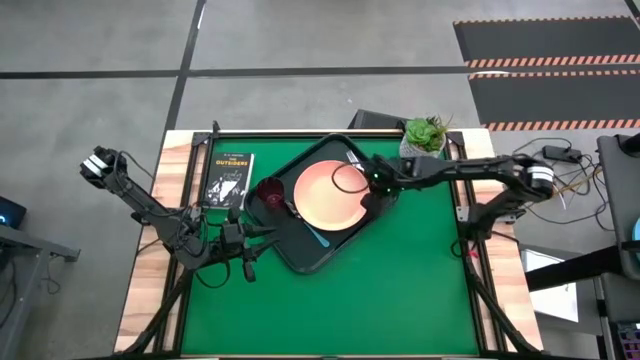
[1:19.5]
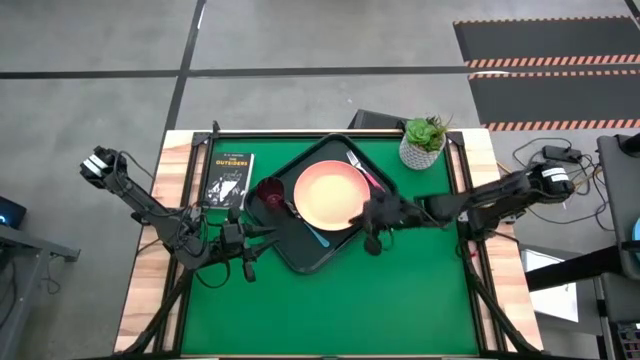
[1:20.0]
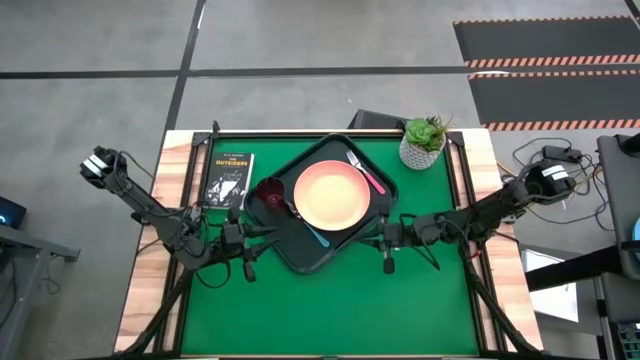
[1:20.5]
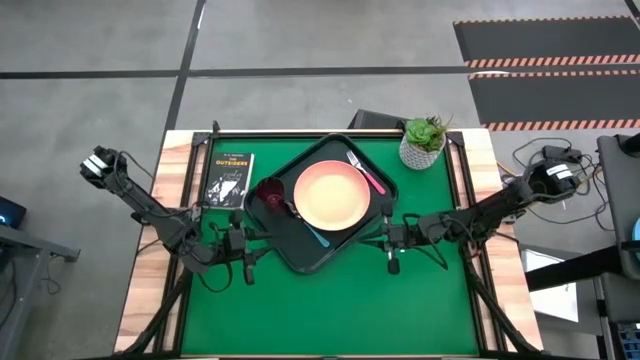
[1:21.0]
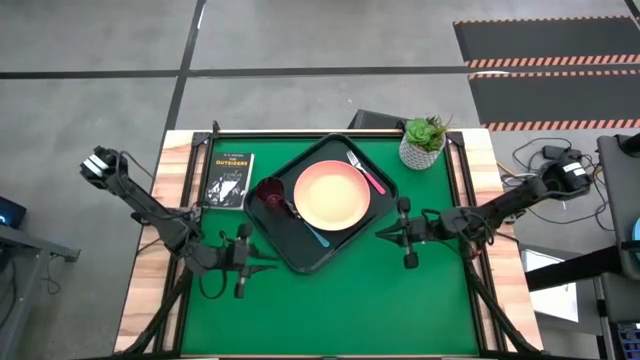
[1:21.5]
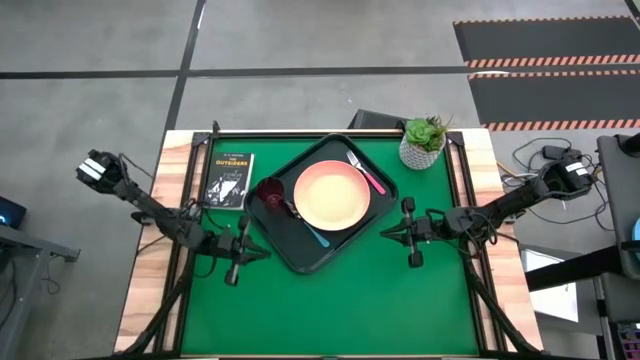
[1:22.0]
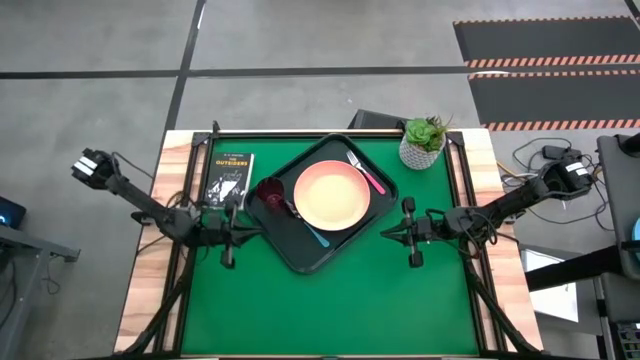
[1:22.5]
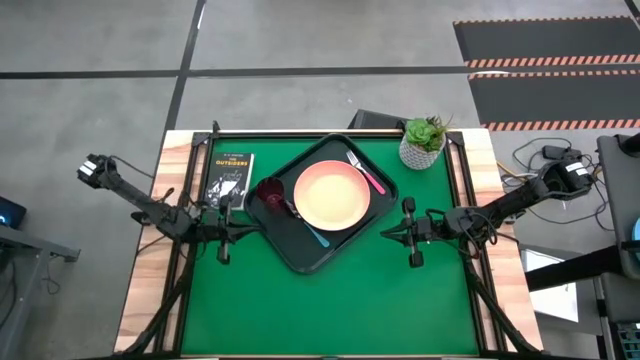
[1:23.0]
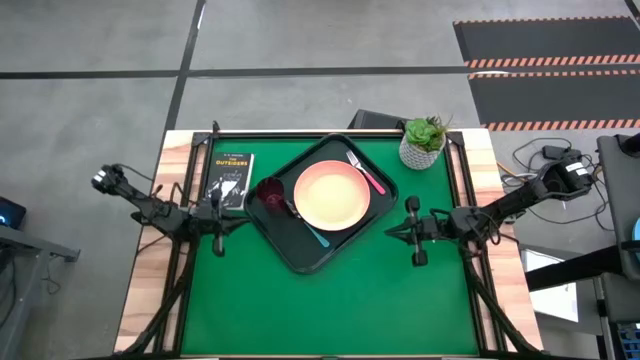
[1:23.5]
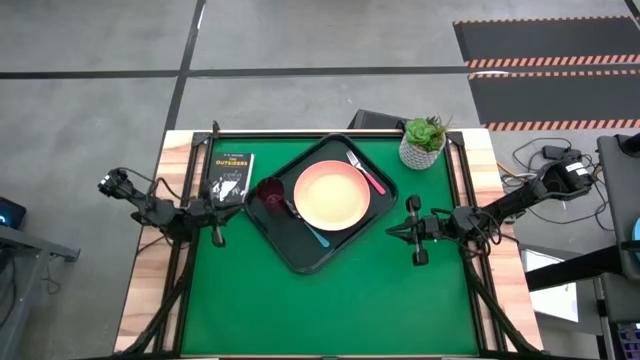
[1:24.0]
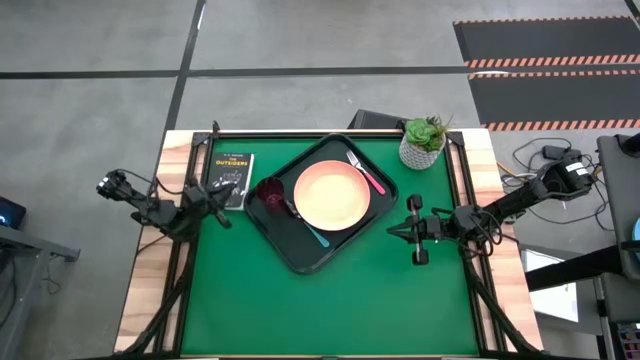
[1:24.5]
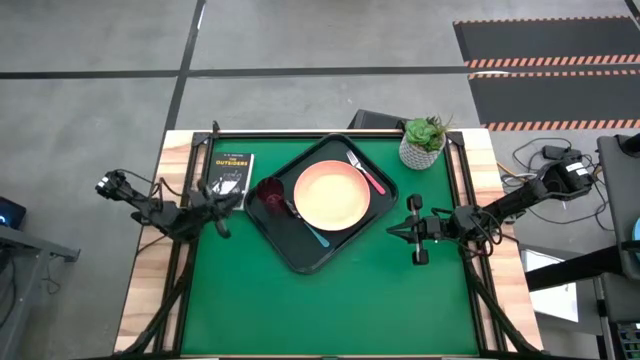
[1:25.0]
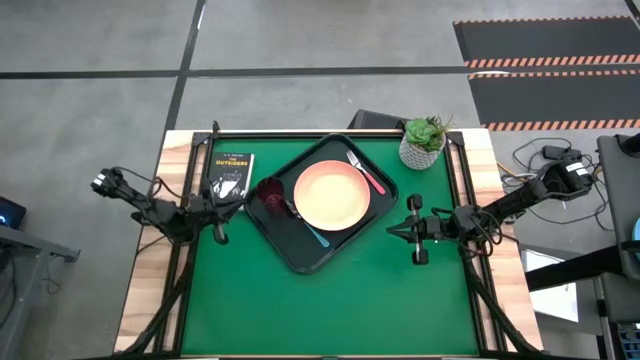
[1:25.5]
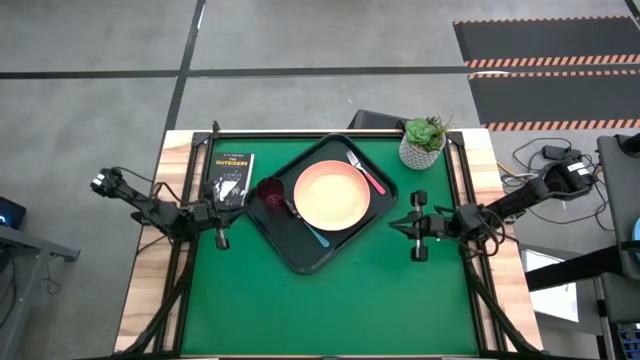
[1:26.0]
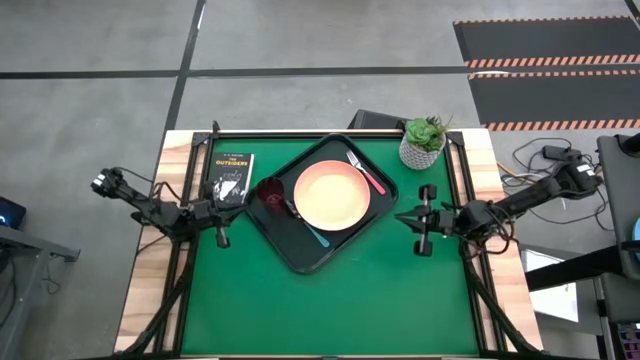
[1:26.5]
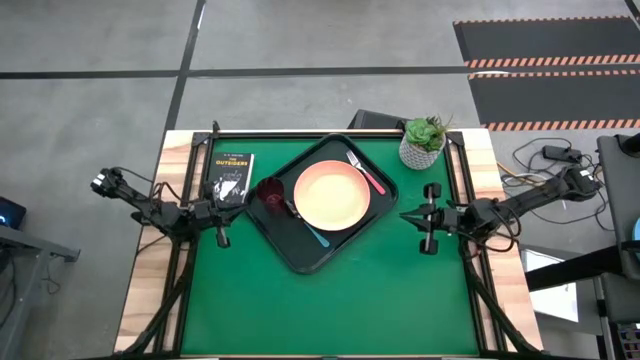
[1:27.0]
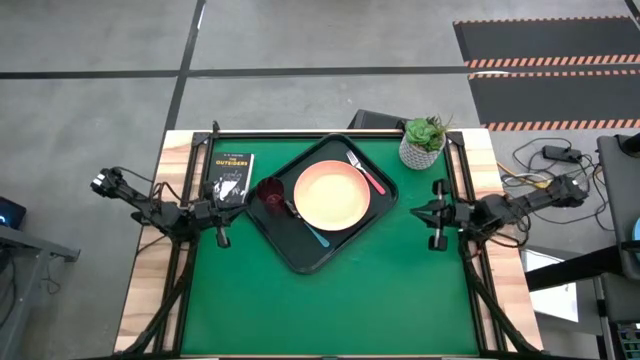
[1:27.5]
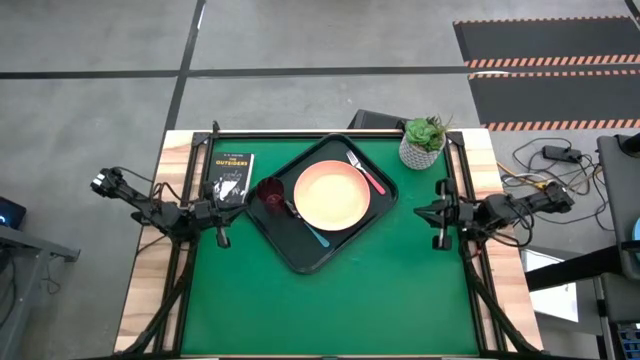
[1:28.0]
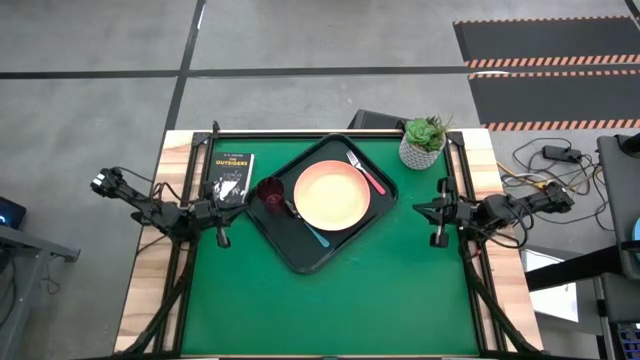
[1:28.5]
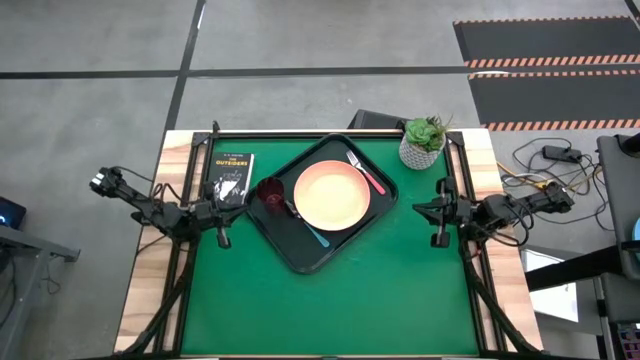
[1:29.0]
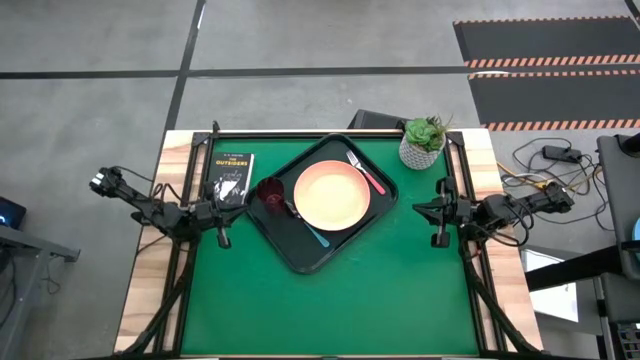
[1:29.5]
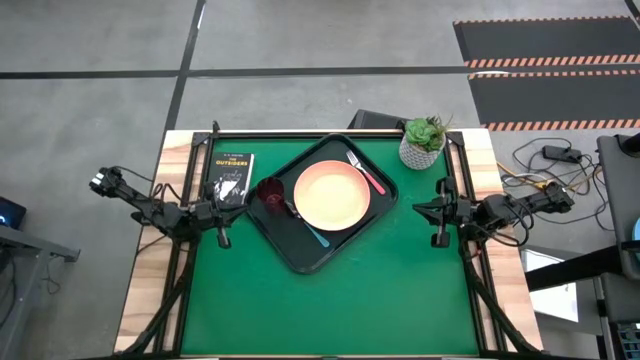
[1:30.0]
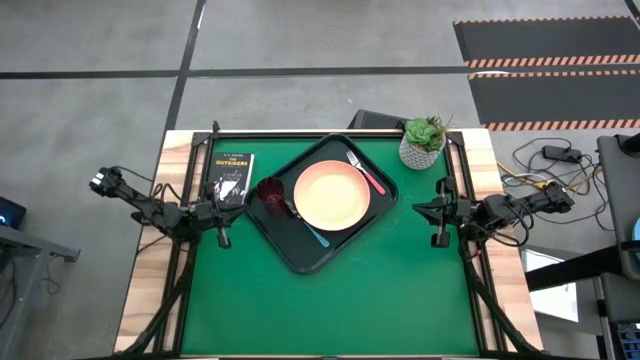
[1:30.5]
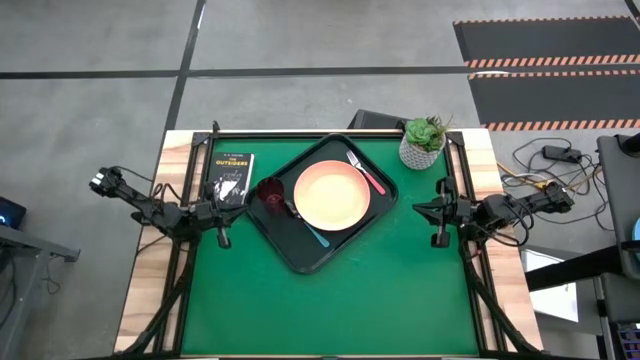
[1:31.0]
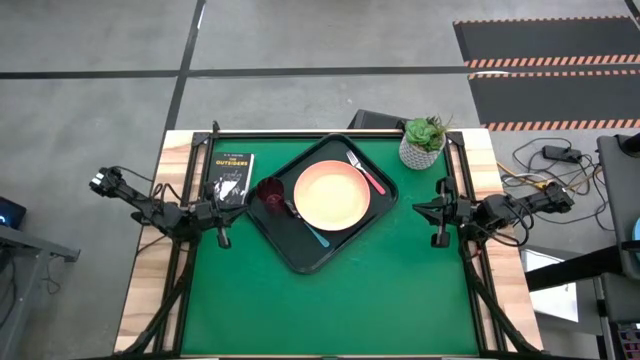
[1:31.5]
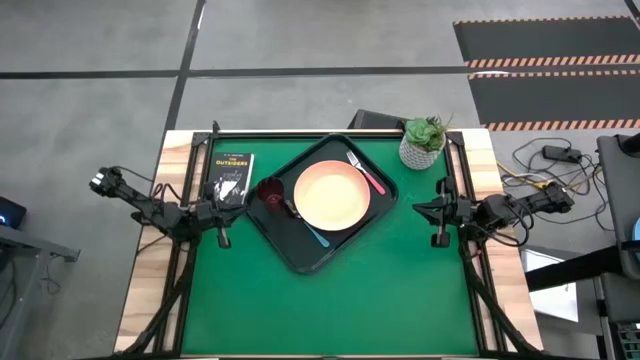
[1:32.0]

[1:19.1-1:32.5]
Task: Pick and place plate/cup/fork/spoon on tray
Return to Home Position

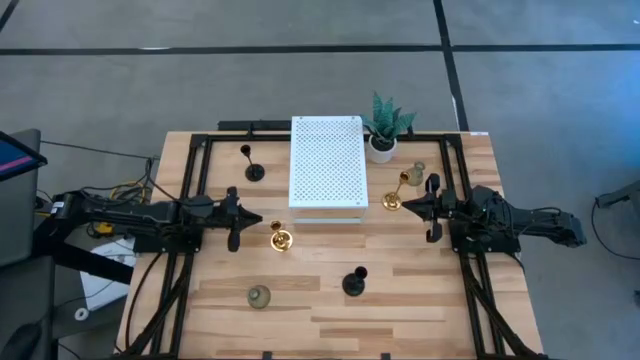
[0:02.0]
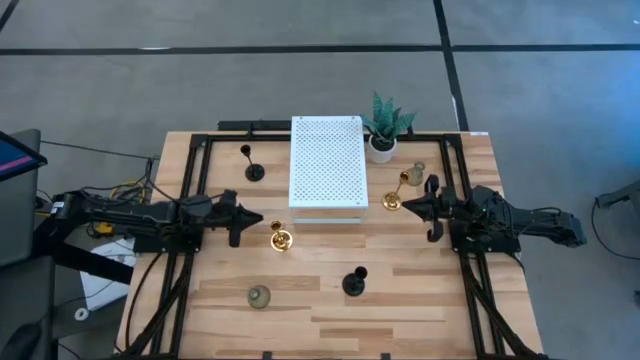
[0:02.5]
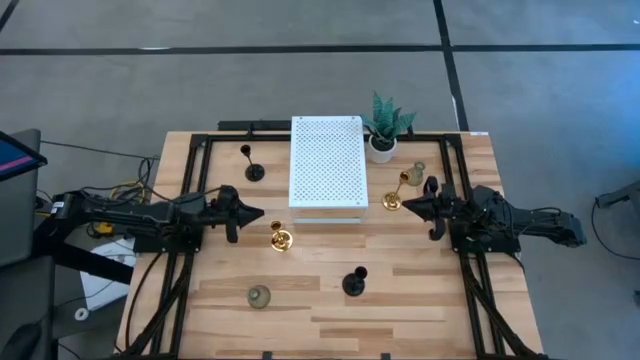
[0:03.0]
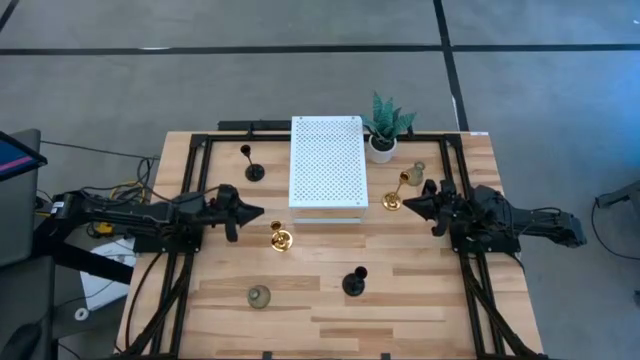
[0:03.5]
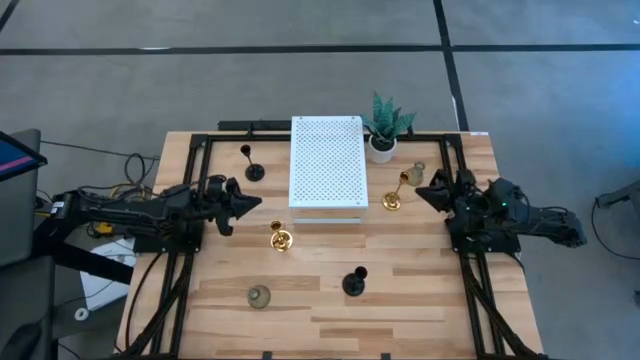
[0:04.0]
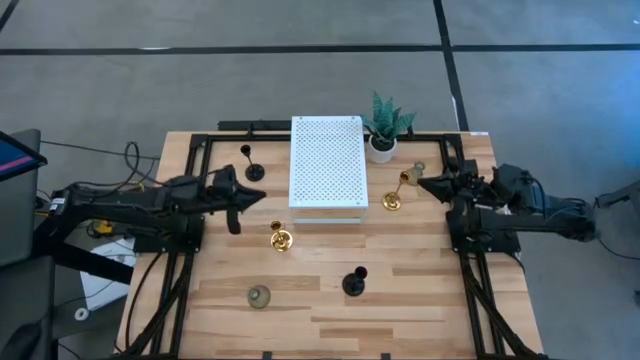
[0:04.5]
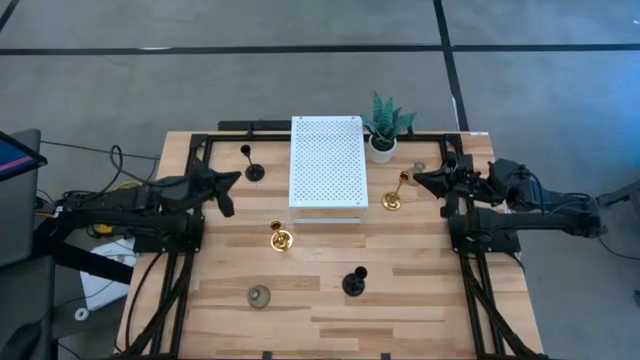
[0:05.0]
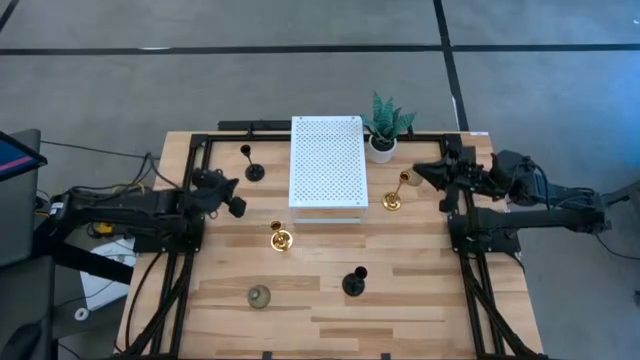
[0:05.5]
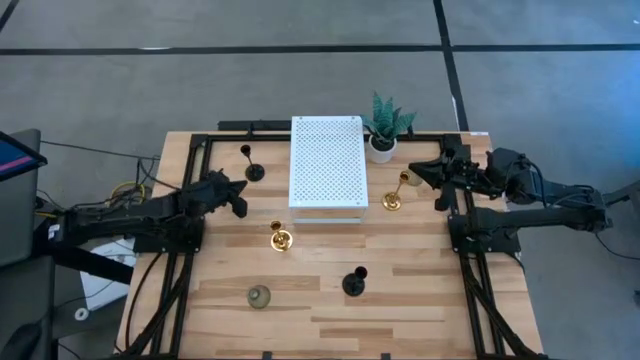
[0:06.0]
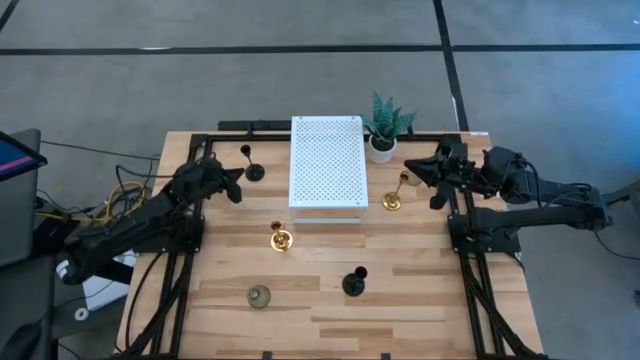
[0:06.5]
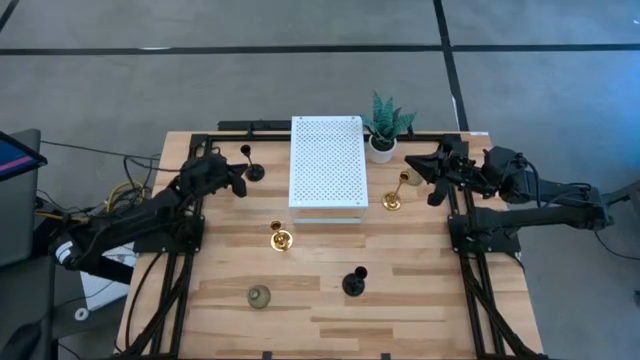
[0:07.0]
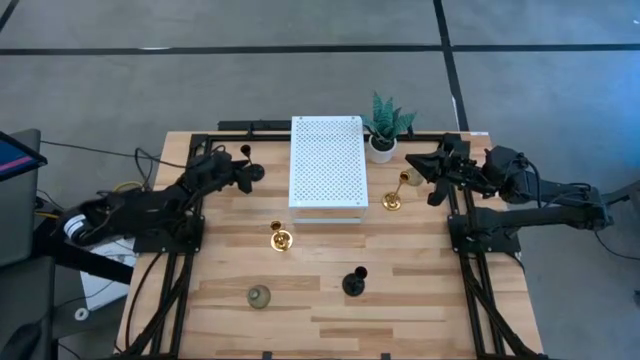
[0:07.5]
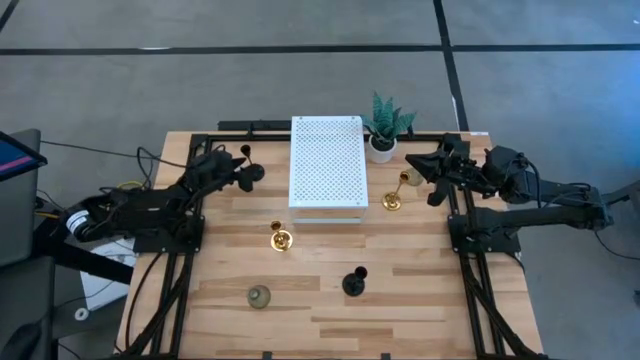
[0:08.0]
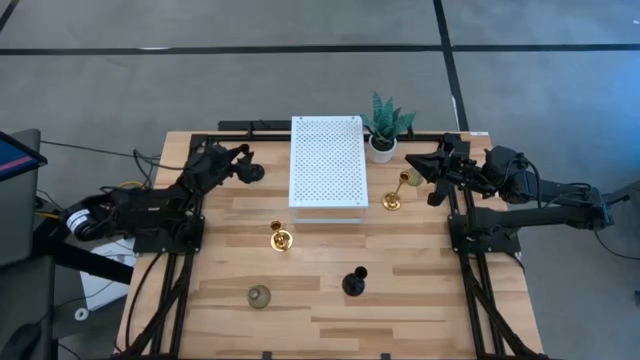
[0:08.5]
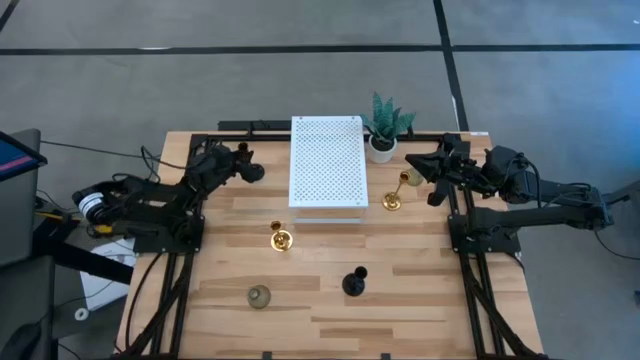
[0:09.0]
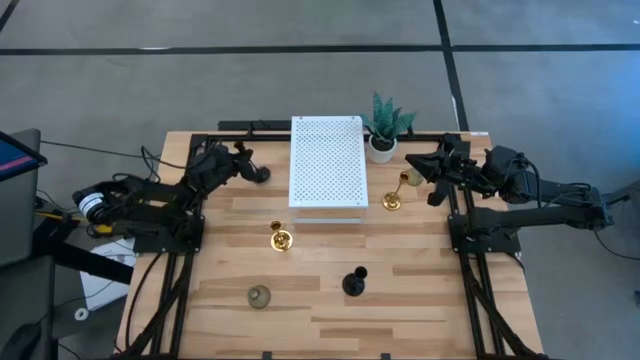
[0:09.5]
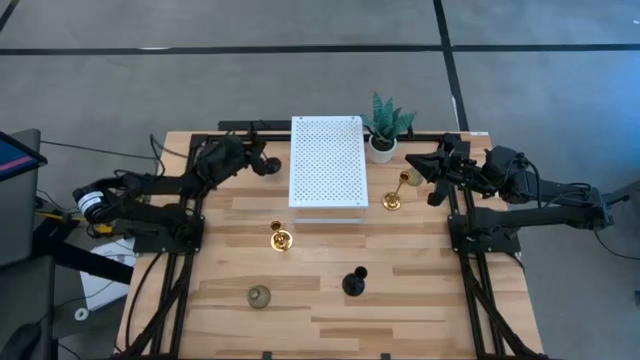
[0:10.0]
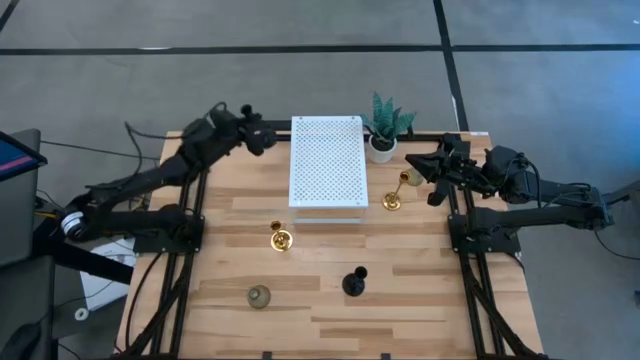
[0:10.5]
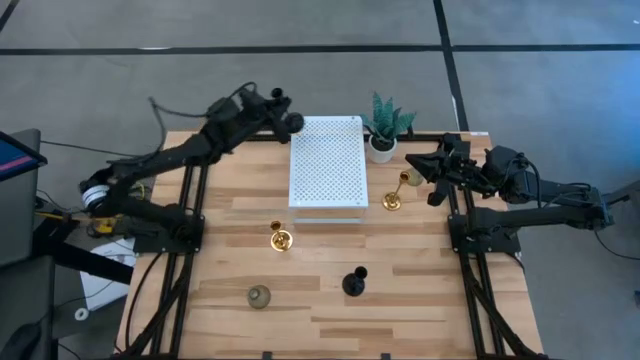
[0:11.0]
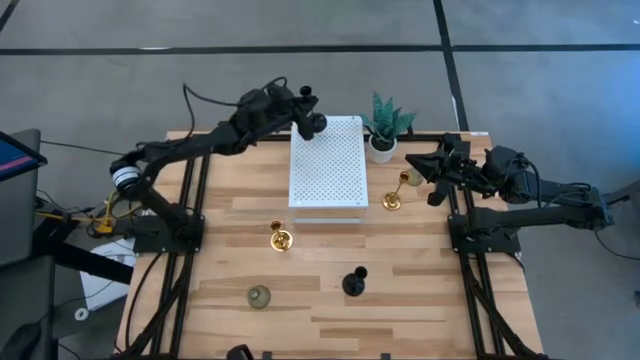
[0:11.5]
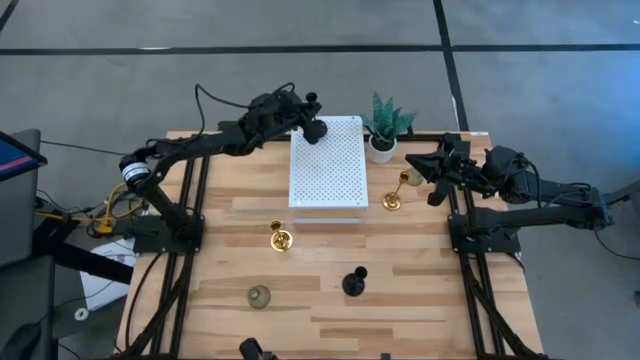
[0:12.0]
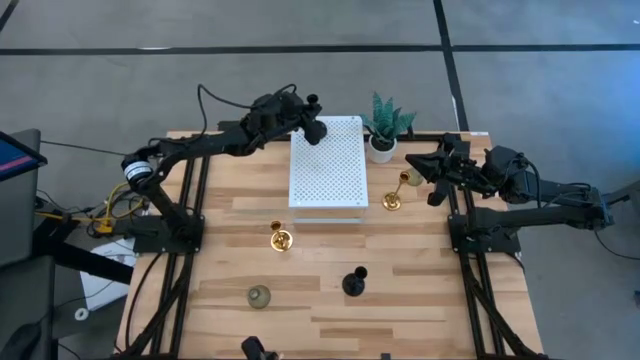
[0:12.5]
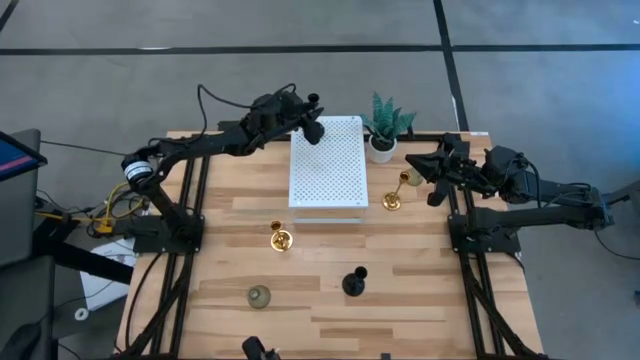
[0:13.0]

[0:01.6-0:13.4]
Task: Pick & Place candle stick holders
Put the top black candle holder on the shelf
